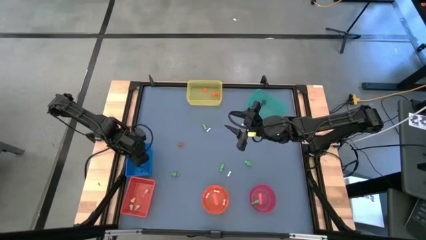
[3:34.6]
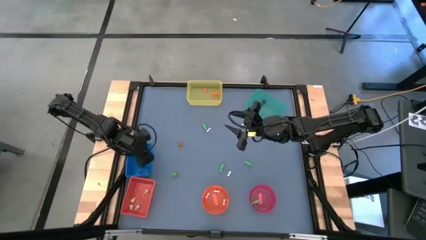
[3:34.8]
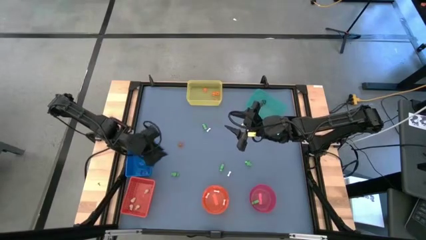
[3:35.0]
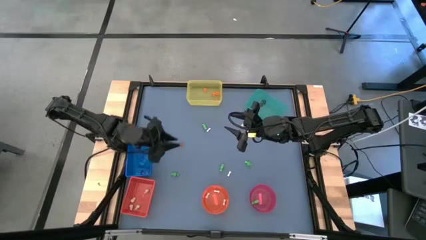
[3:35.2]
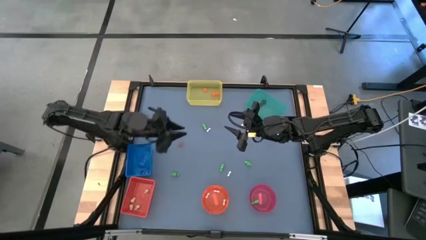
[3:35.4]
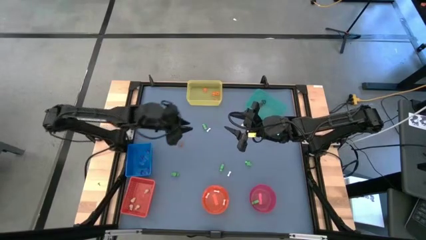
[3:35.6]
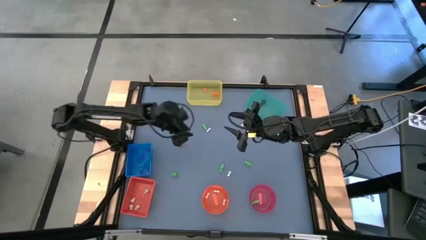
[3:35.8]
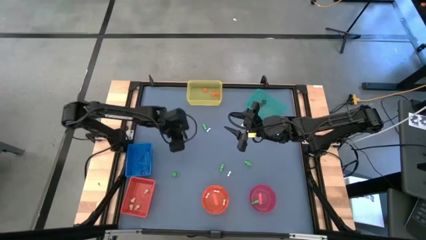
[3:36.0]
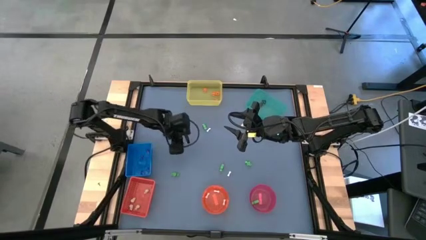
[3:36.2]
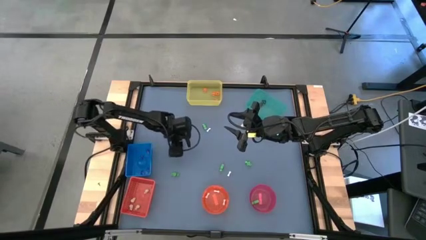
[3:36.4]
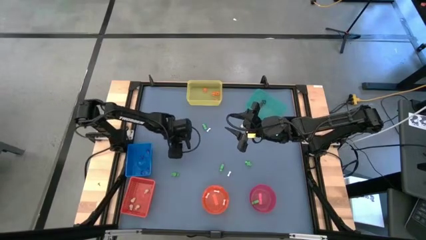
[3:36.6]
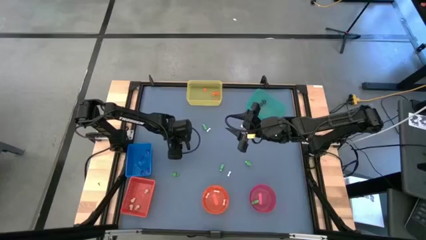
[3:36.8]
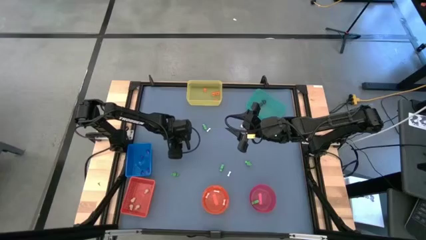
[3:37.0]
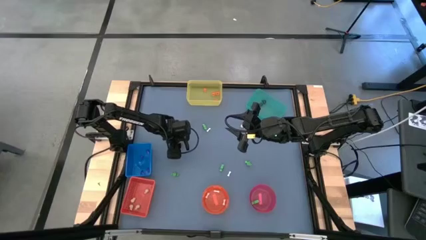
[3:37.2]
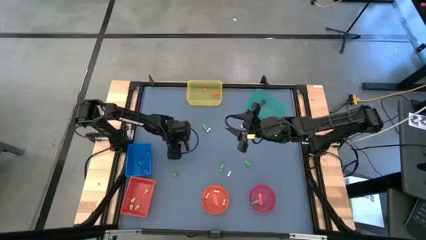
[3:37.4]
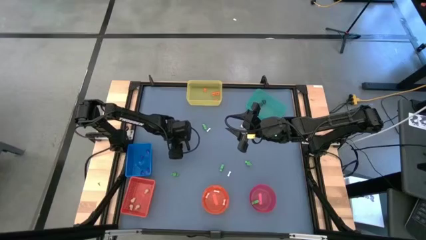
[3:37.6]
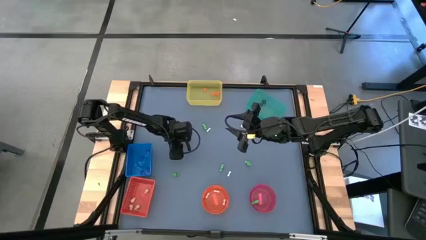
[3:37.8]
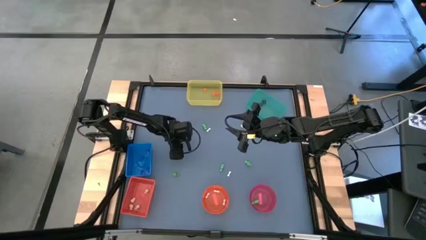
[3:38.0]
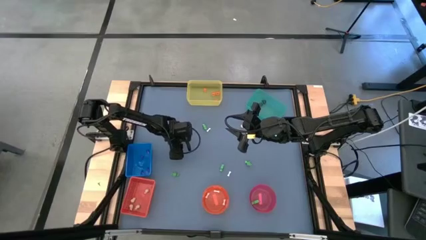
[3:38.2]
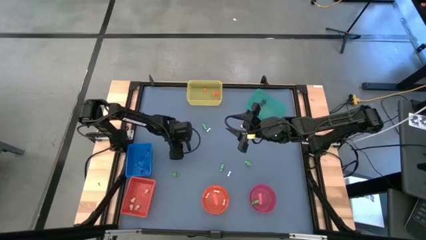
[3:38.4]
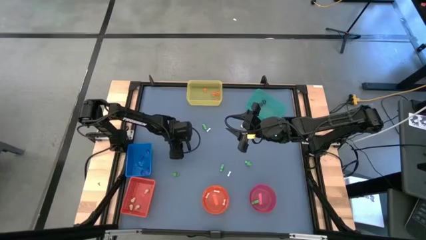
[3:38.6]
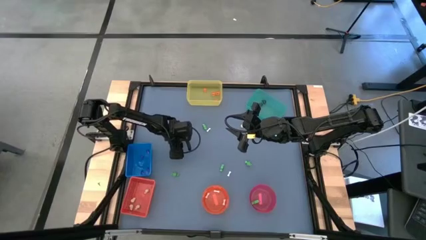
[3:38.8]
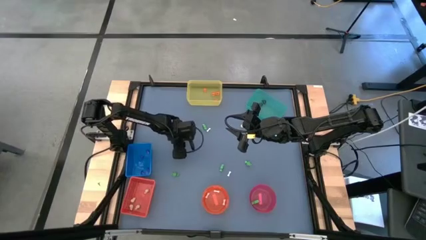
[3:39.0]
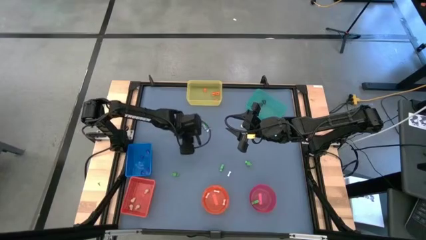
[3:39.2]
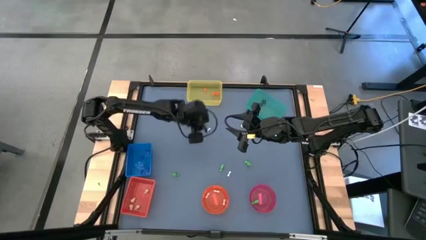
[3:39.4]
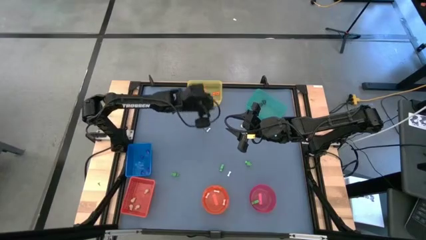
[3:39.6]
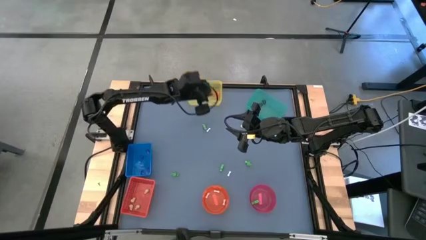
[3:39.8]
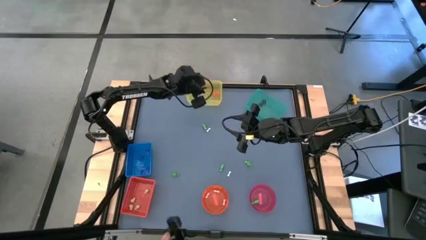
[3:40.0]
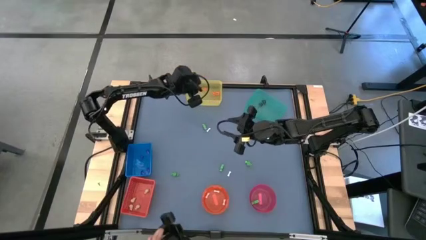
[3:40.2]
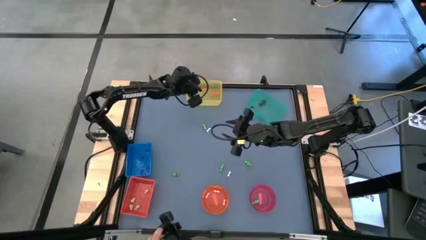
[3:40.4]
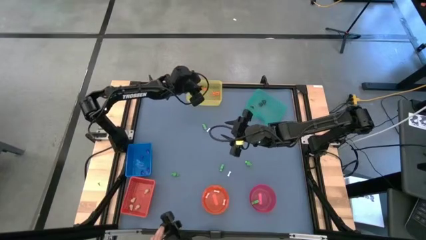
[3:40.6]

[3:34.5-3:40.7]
Task: Sort Halloween decoration
Put the orange pumpkin toy into the yellow bin

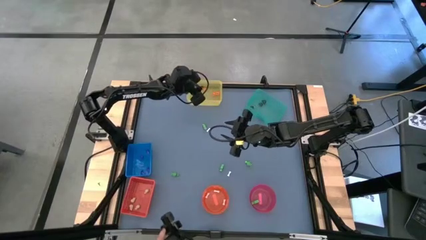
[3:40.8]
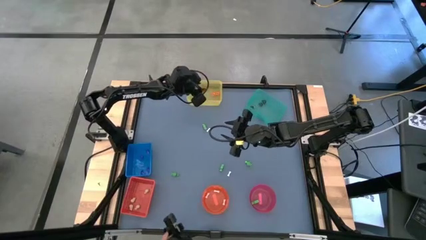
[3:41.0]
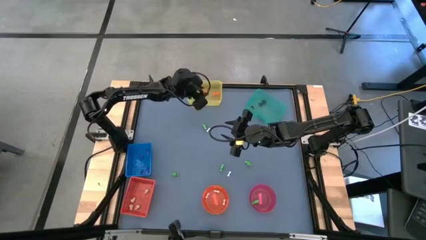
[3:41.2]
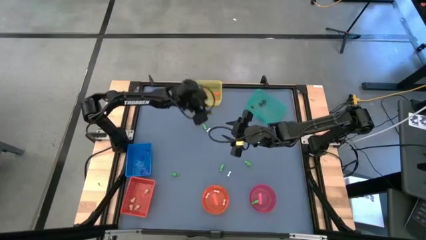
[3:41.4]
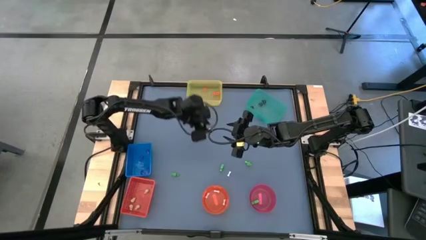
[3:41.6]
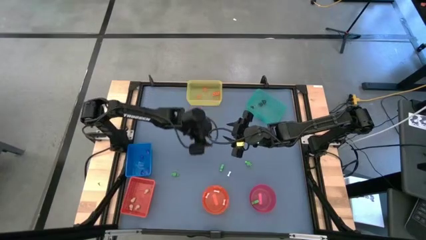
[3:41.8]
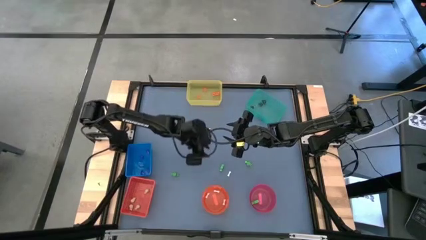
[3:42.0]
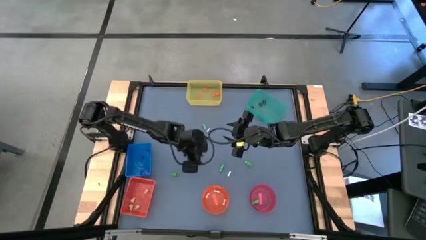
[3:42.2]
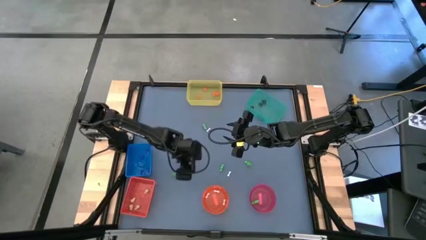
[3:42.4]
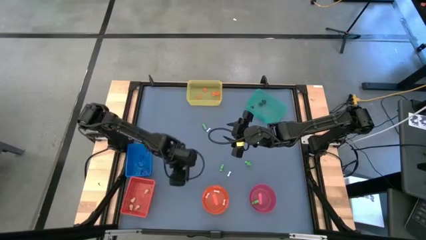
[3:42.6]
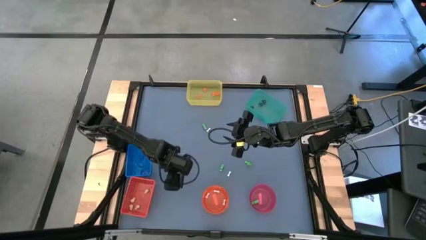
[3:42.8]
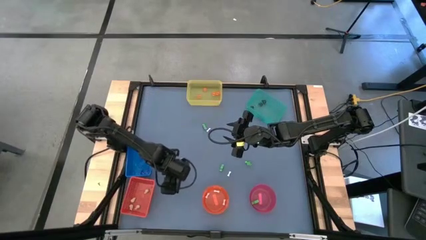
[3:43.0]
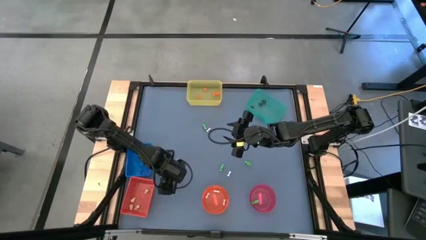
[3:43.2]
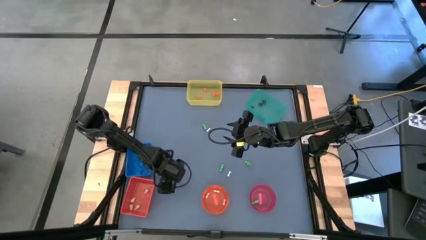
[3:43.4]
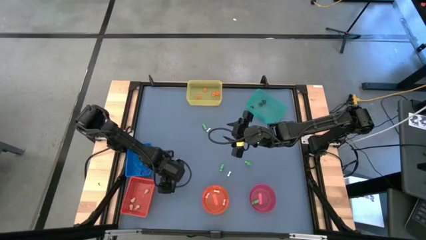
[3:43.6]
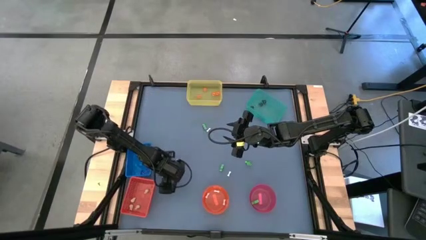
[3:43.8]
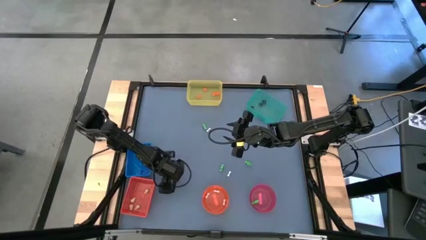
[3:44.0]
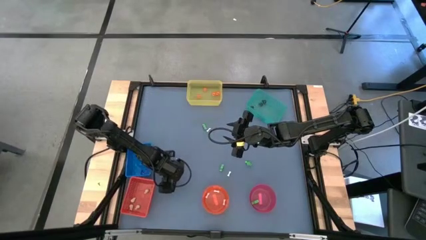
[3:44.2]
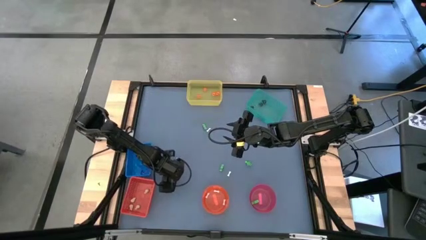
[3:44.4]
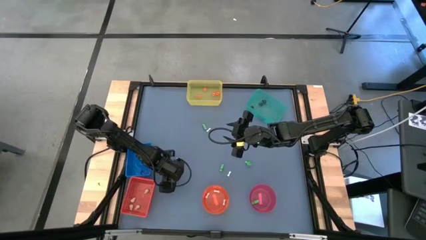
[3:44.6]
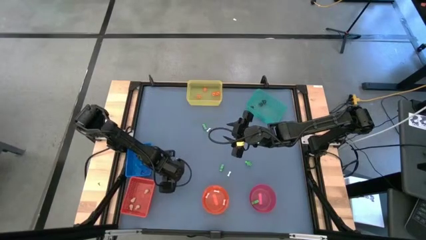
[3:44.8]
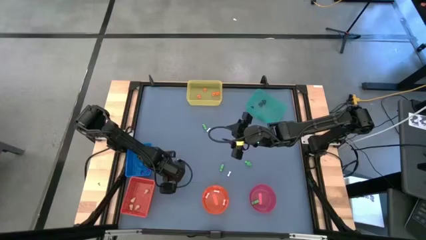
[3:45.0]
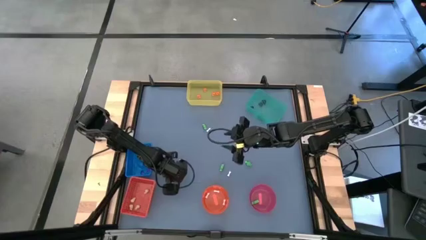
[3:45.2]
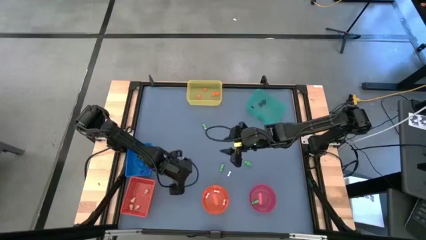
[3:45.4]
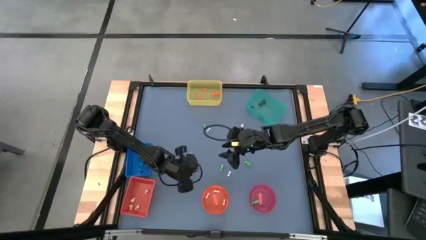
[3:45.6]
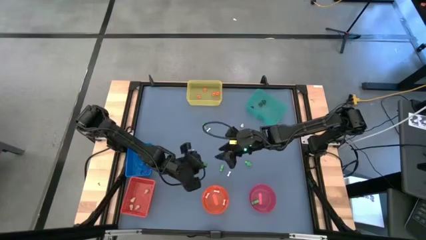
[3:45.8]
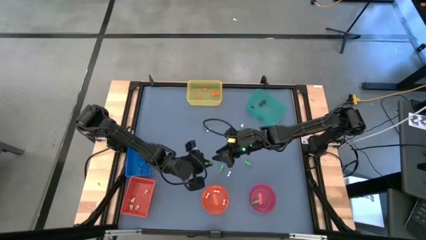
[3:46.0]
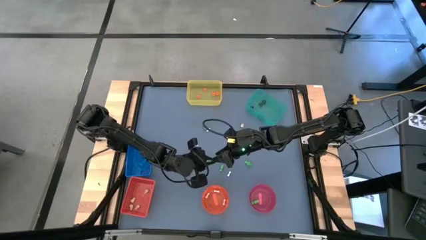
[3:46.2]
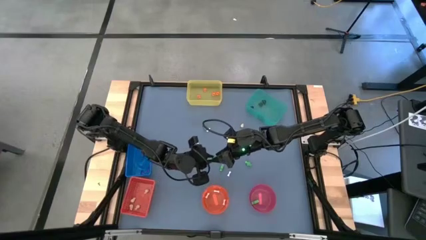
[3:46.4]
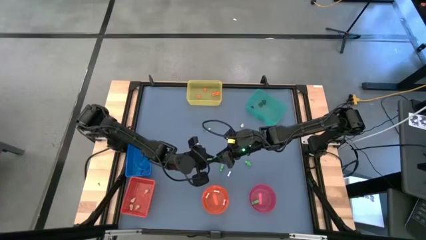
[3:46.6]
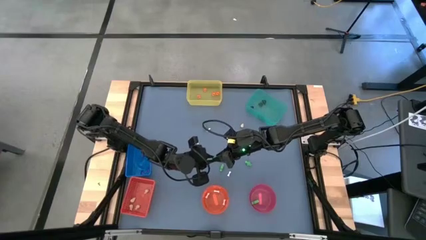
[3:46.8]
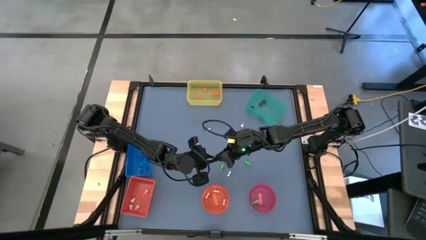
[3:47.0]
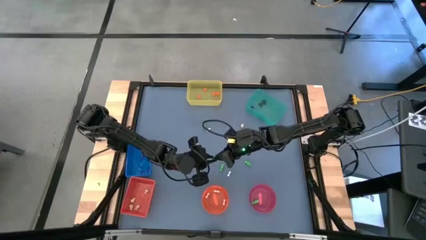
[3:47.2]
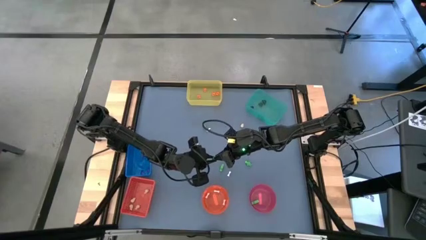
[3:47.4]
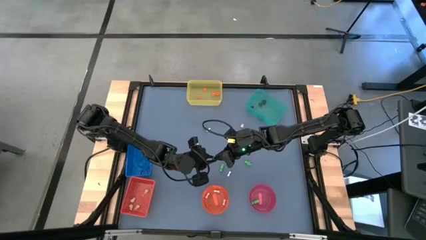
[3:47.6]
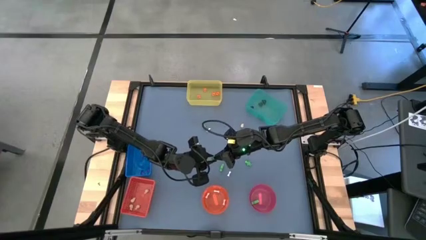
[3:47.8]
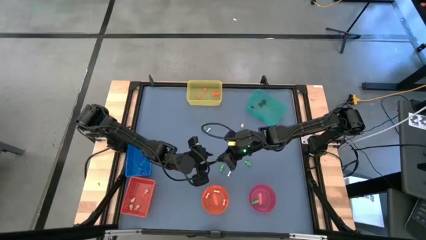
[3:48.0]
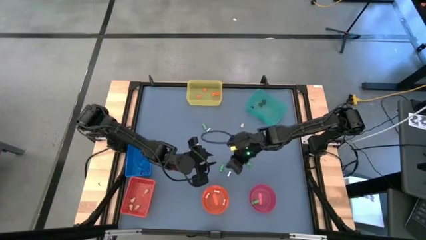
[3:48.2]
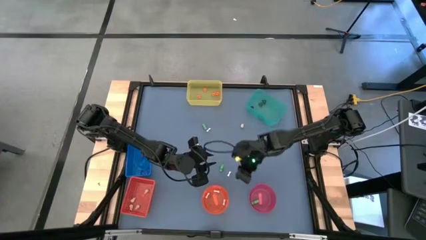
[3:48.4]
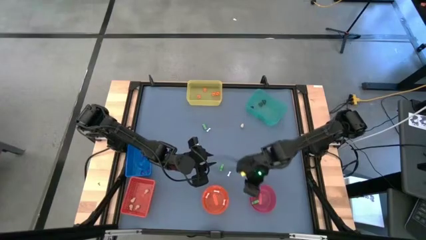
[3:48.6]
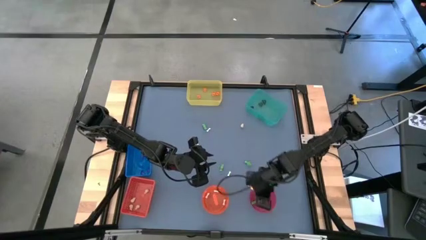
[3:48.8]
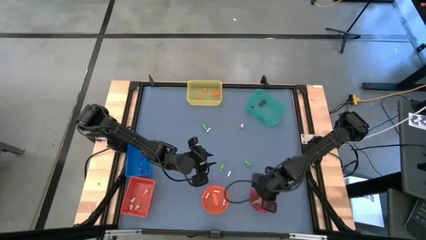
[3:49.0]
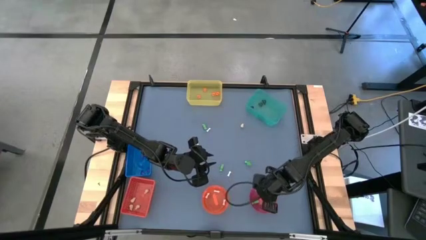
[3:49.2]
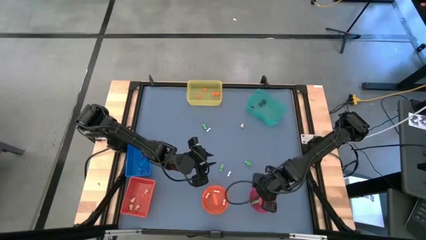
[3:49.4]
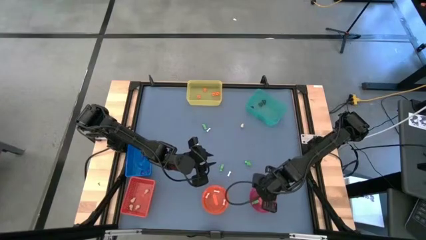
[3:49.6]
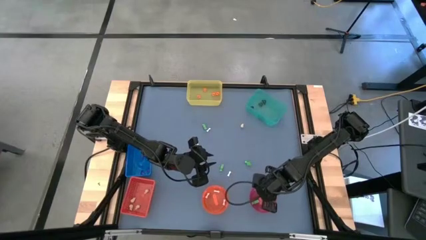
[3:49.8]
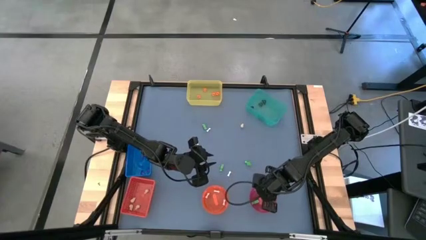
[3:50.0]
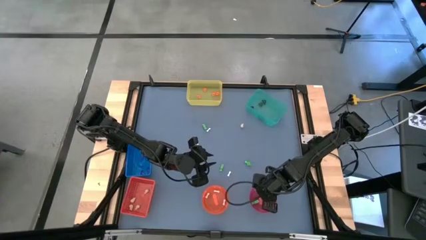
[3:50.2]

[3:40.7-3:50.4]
Put the green skeleton toy into the pink bowl
